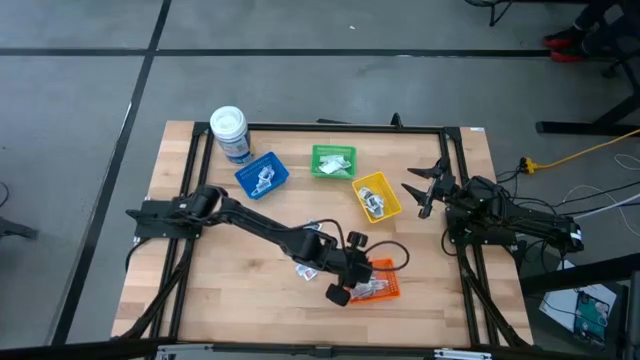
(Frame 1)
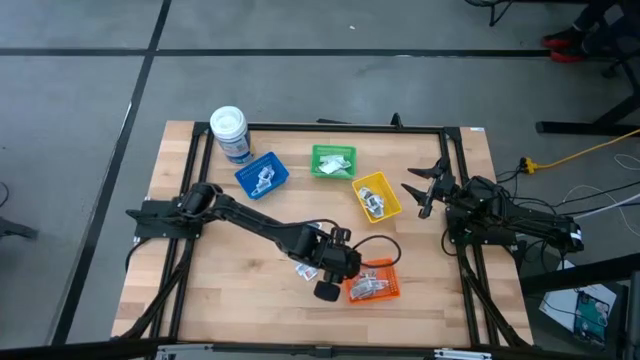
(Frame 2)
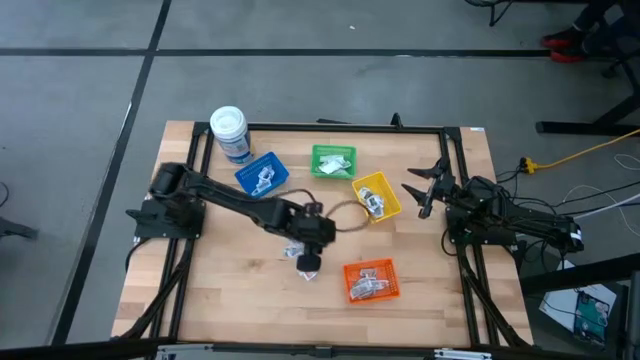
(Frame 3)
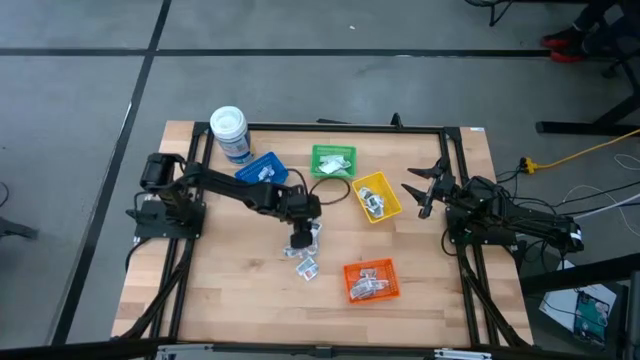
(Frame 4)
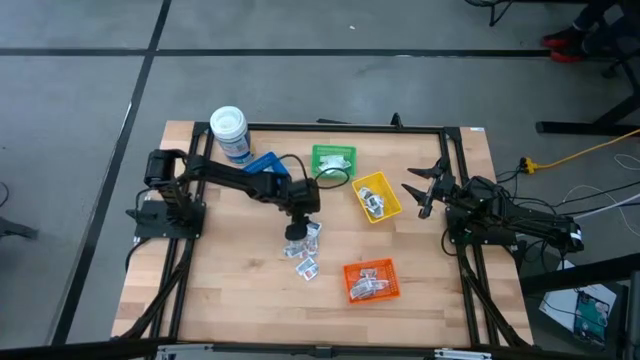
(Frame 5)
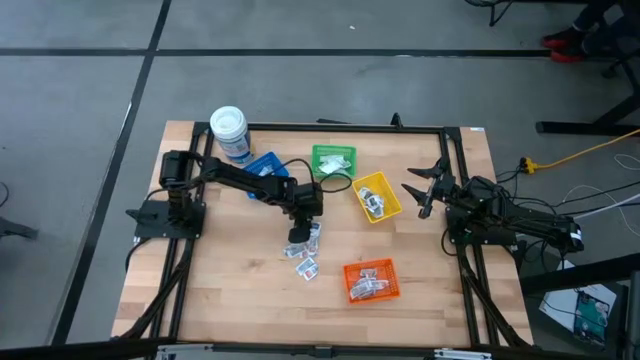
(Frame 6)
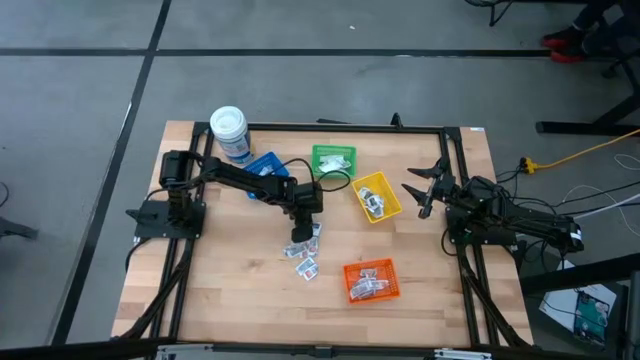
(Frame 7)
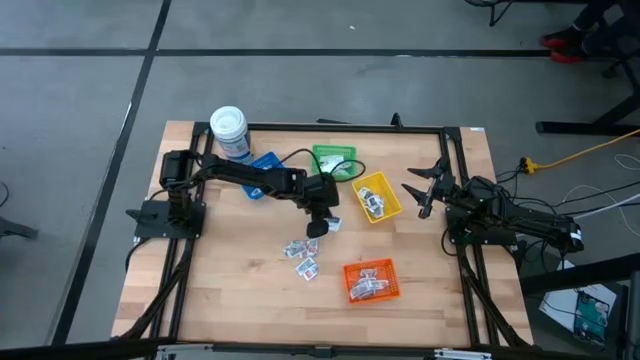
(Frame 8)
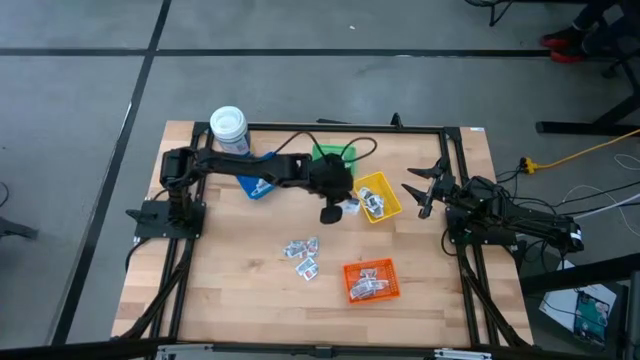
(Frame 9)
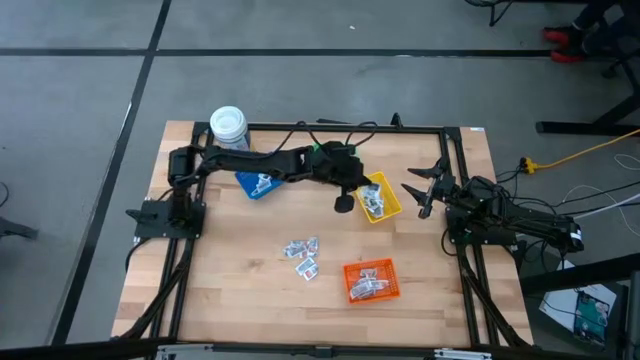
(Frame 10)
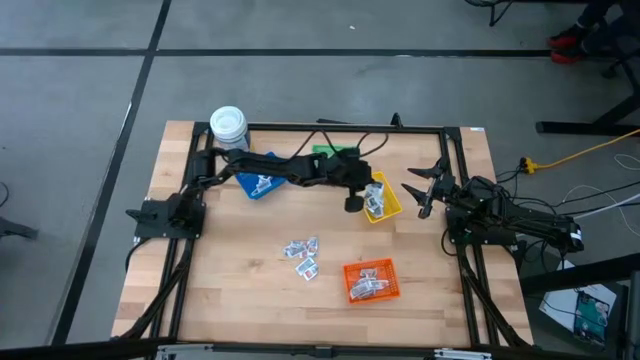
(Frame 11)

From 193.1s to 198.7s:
Task: Pick & Place First Aid Supplies
Put the white towelette pack into the yellow bin

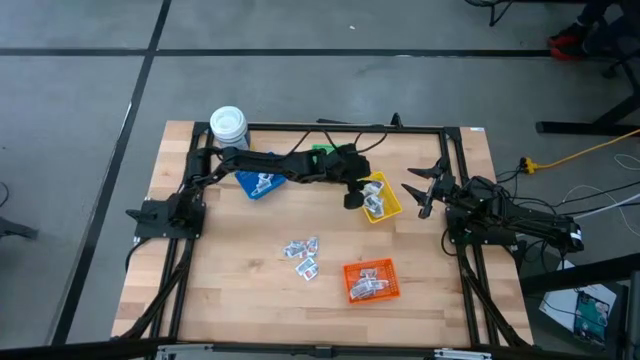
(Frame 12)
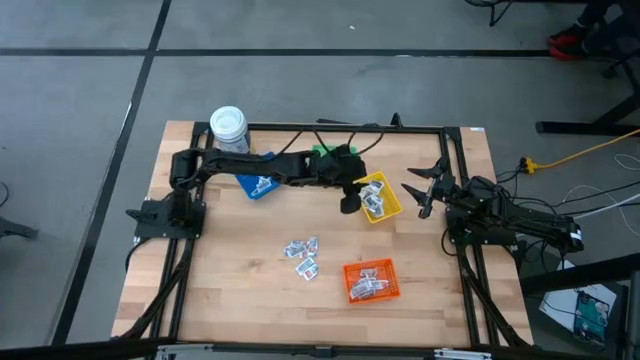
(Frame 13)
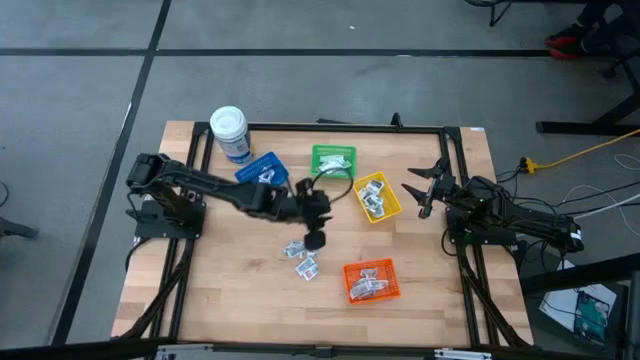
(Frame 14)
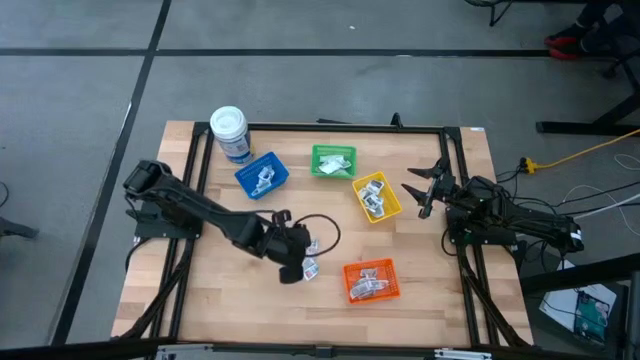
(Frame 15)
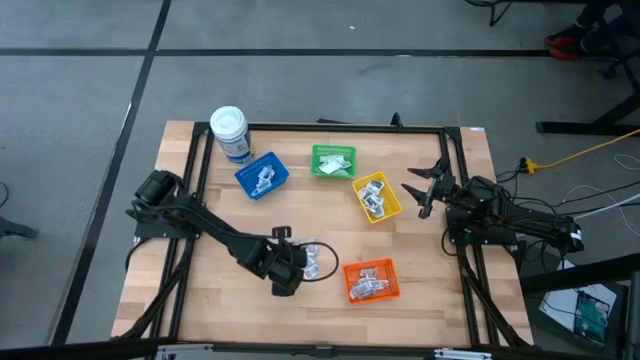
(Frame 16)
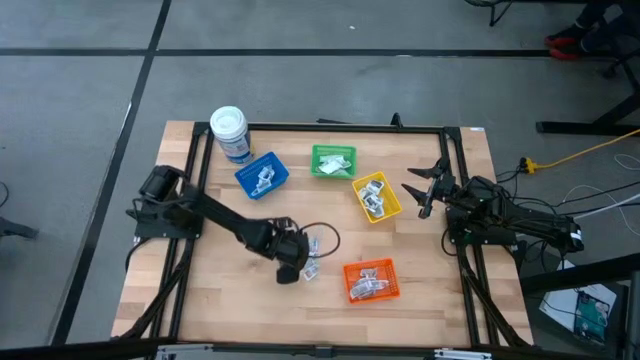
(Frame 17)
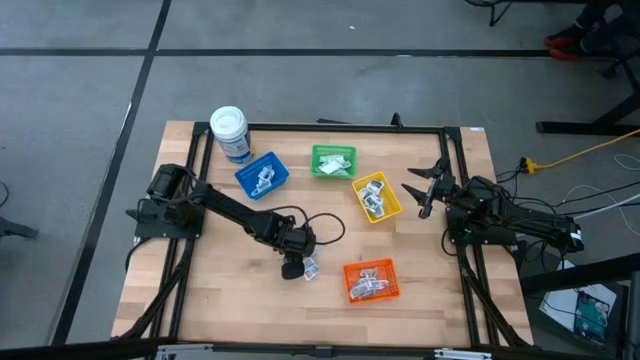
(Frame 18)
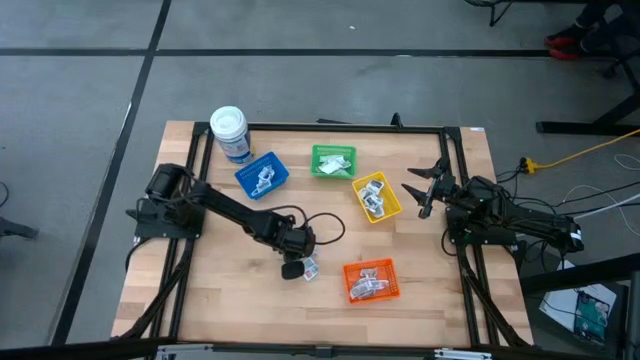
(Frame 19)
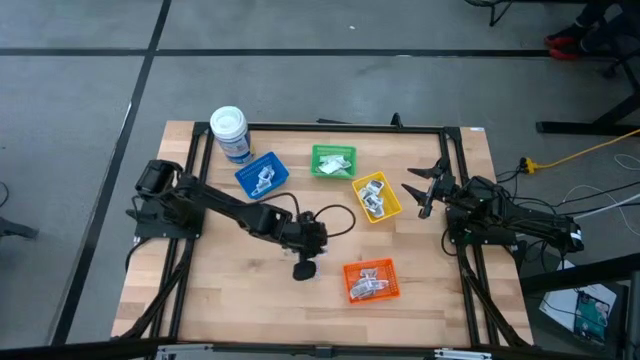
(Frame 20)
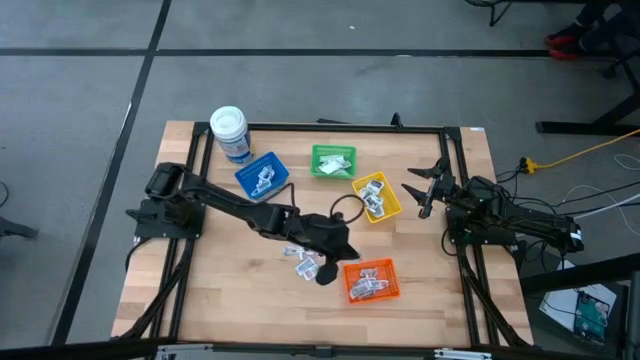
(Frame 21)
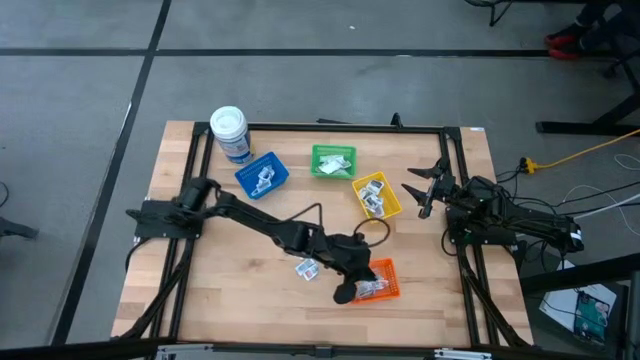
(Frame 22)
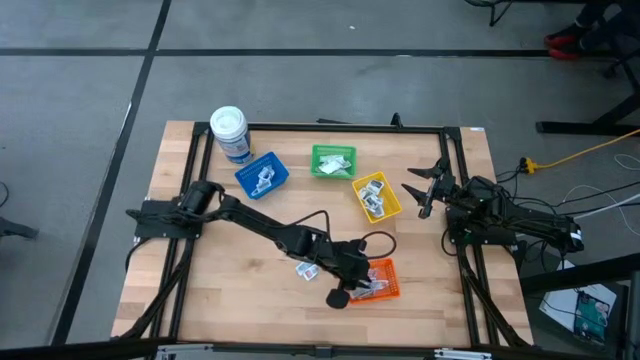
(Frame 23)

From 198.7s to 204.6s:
Put the white ointment pack into the orange bin

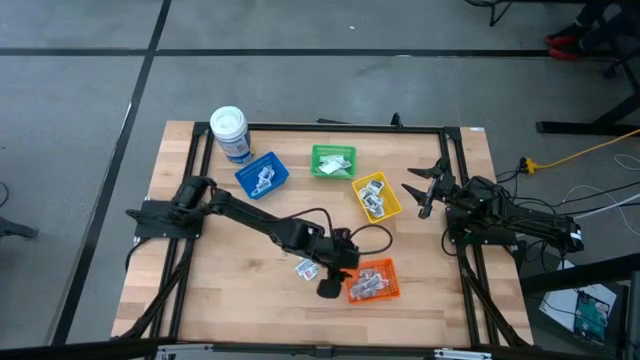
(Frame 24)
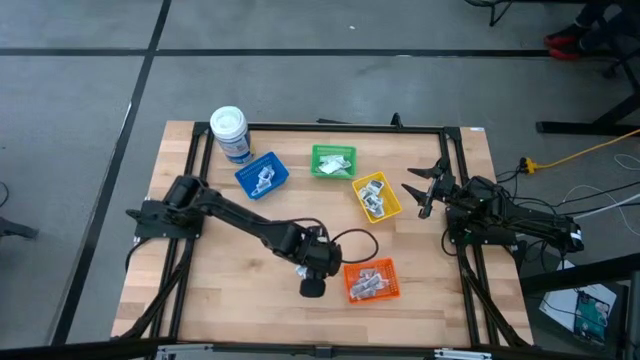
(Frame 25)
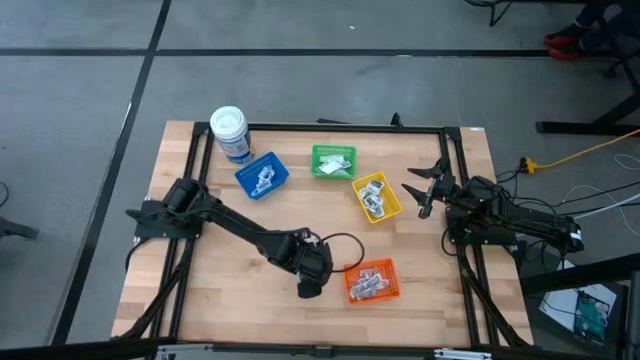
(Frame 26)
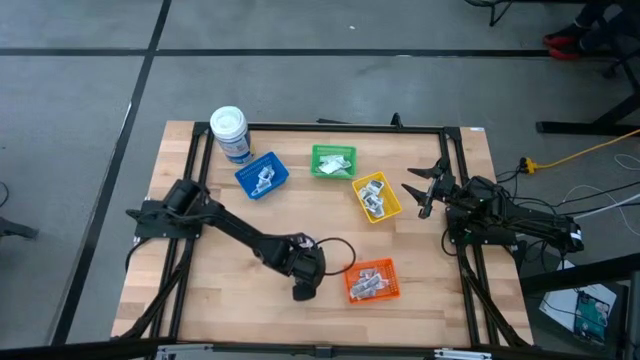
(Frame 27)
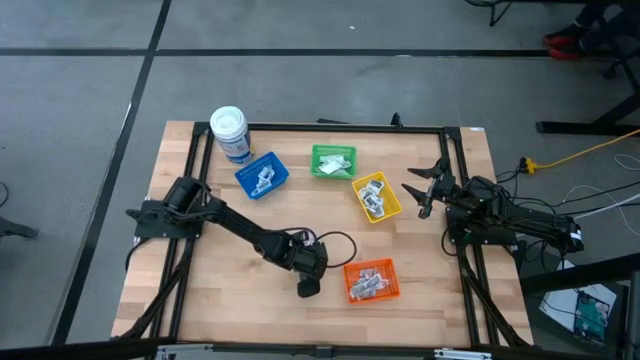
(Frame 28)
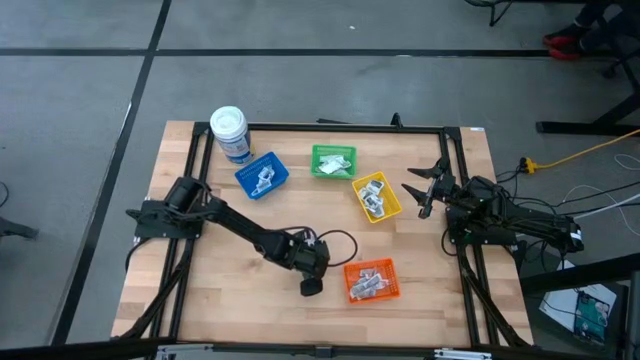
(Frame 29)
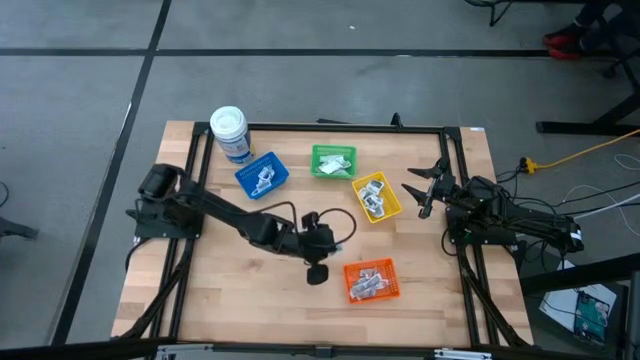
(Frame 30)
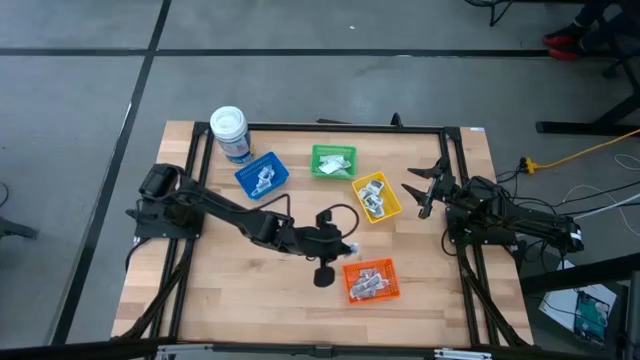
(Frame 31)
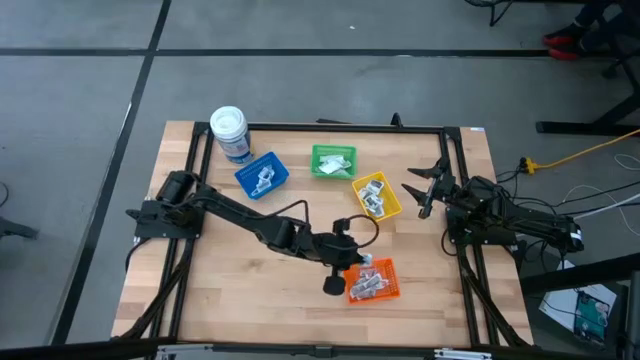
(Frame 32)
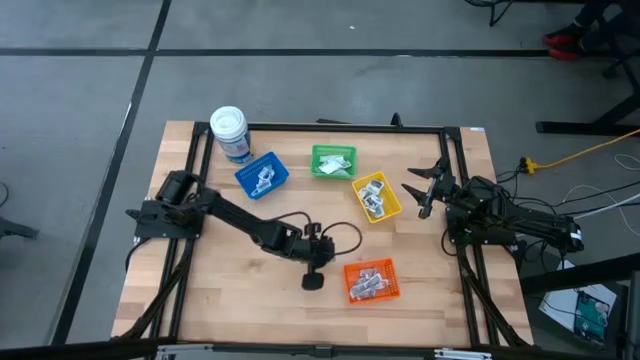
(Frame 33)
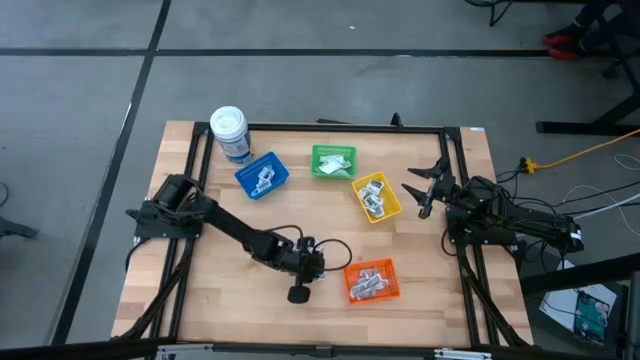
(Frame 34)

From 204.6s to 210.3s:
Put the white ointment pack into the orange bin

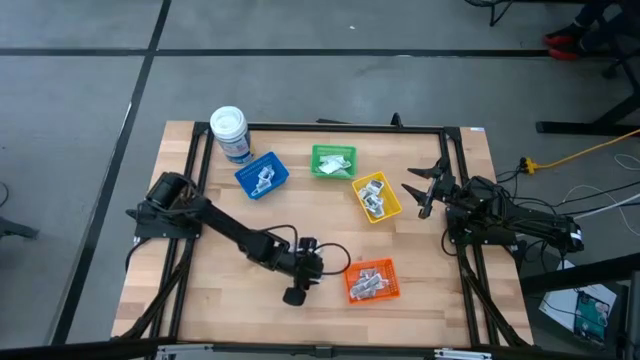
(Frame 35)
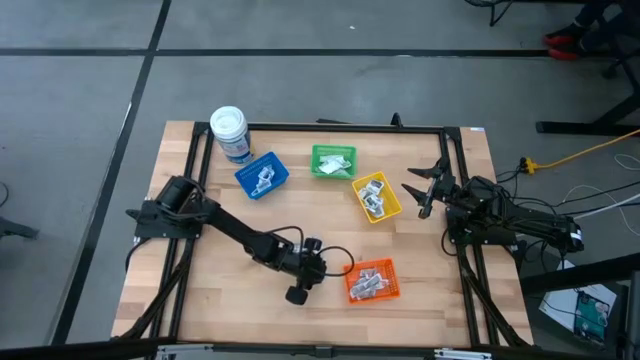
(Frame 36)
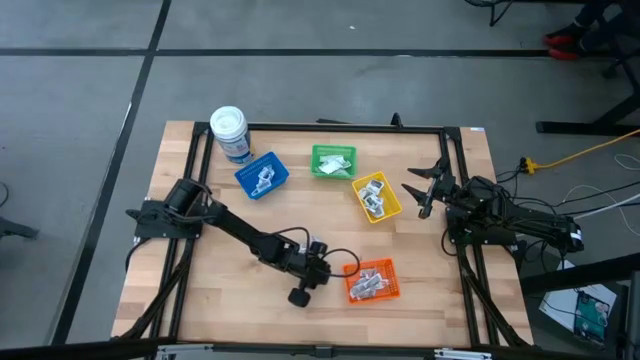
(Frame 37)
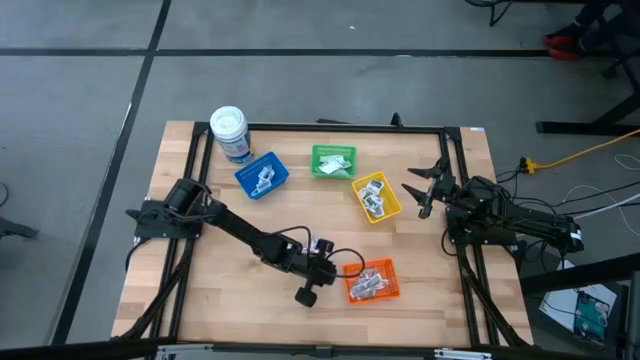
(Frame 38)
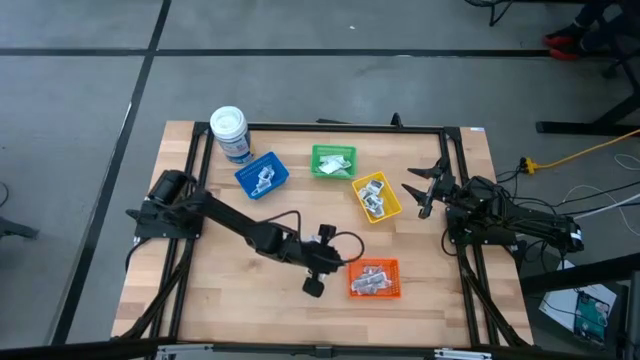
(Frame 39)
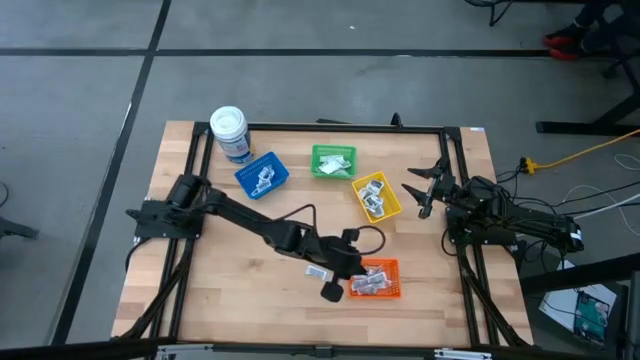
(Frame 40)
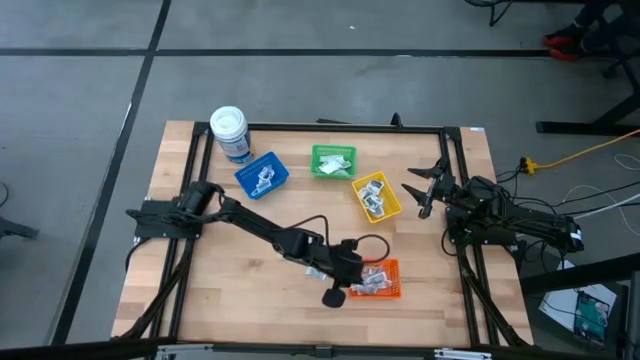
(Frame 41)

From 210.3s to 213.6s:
Put the white ointment pack into the orange bin
